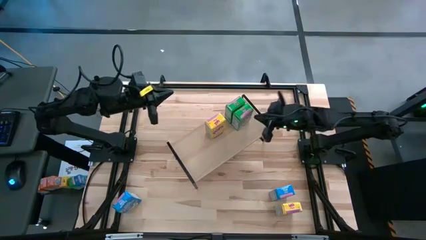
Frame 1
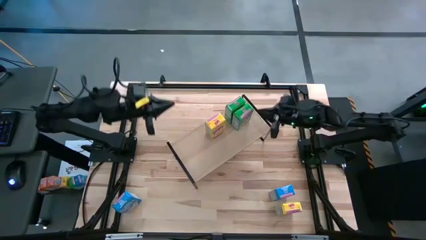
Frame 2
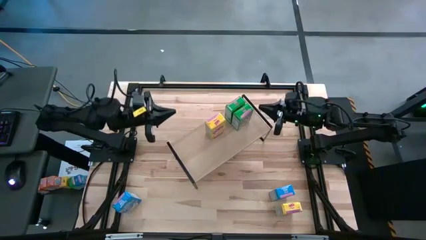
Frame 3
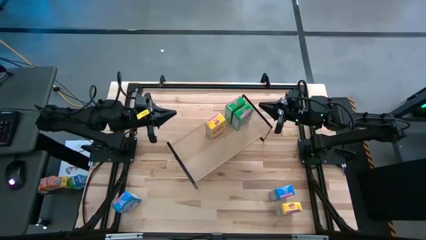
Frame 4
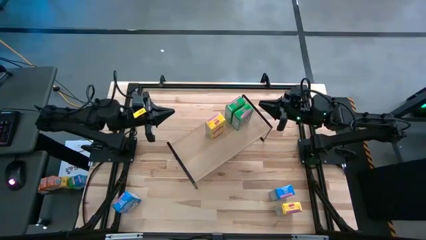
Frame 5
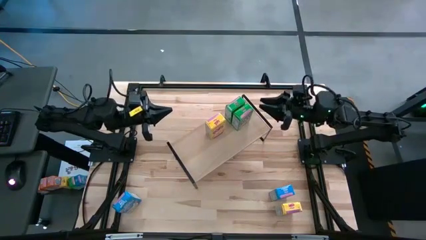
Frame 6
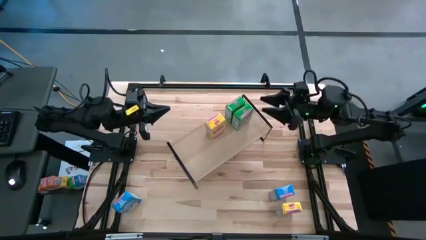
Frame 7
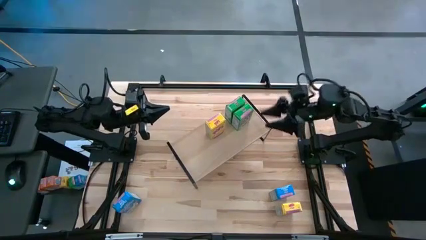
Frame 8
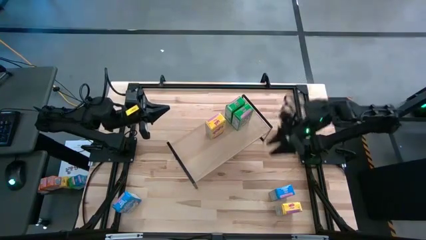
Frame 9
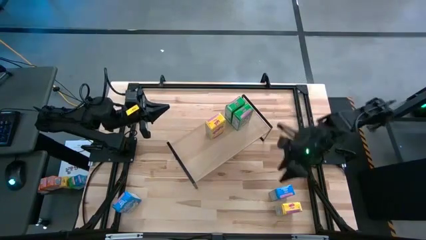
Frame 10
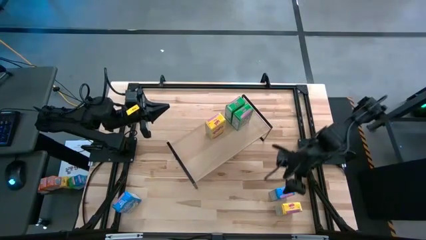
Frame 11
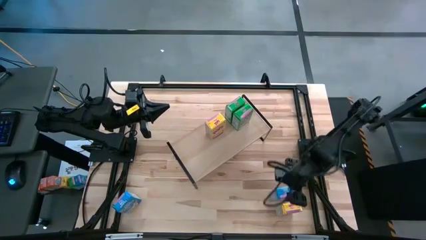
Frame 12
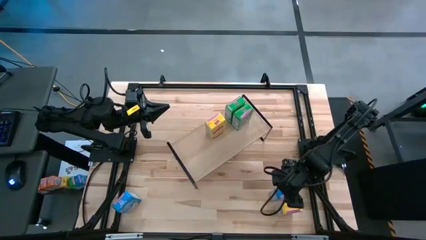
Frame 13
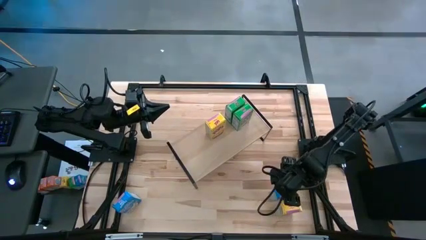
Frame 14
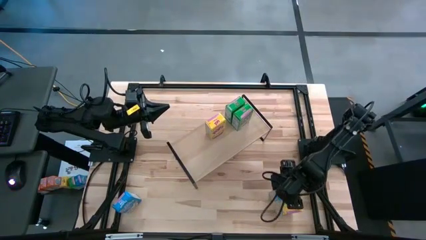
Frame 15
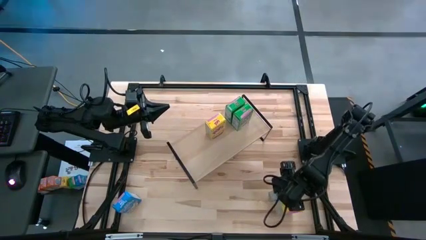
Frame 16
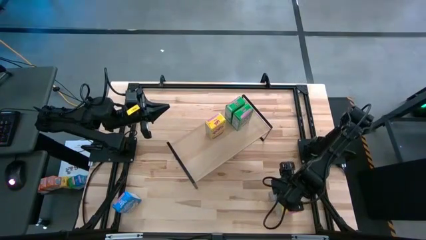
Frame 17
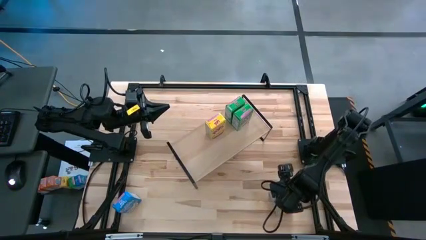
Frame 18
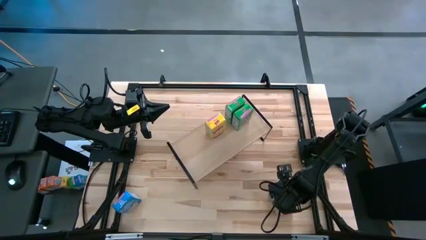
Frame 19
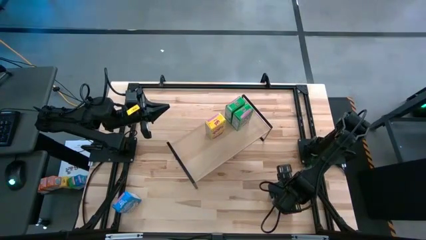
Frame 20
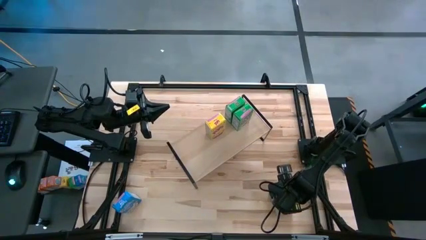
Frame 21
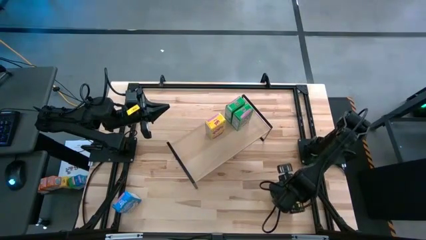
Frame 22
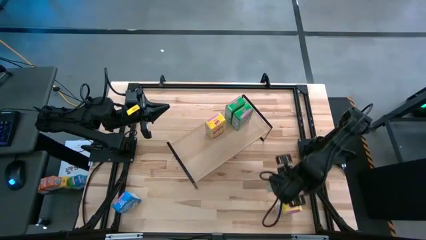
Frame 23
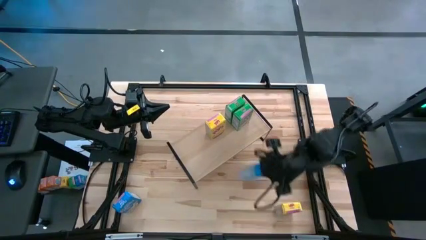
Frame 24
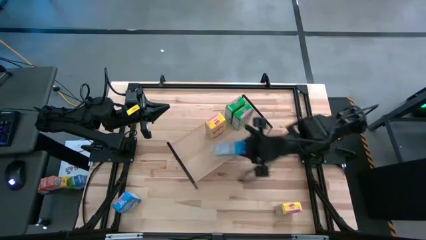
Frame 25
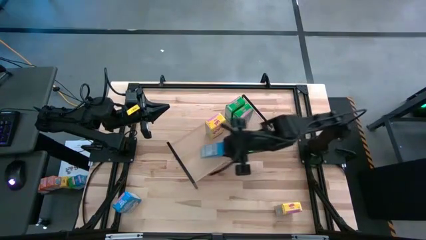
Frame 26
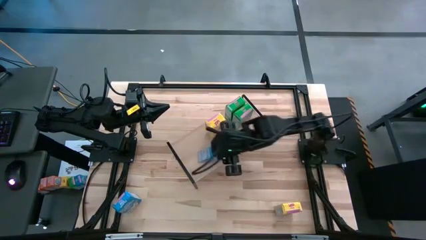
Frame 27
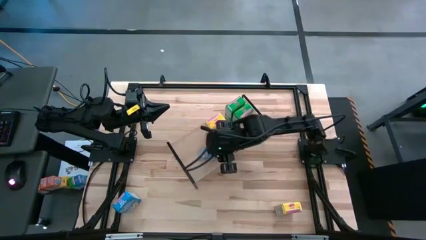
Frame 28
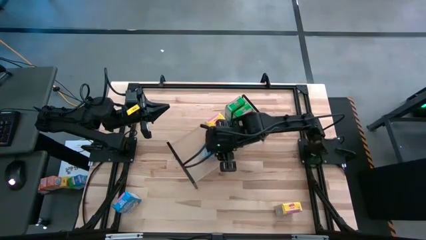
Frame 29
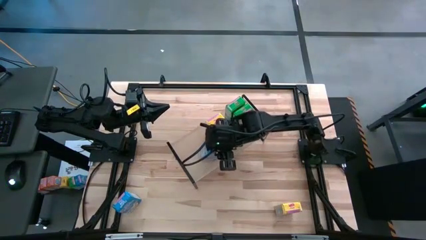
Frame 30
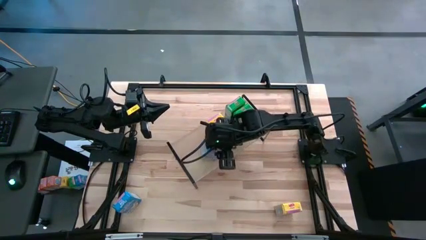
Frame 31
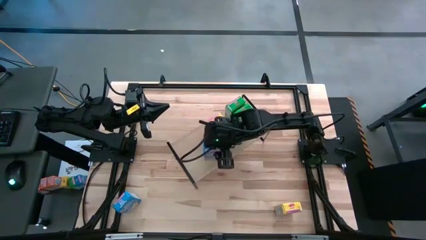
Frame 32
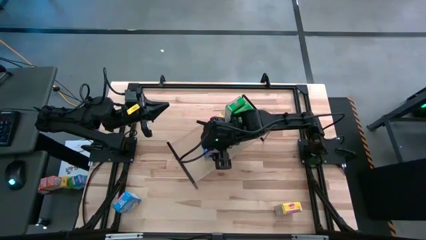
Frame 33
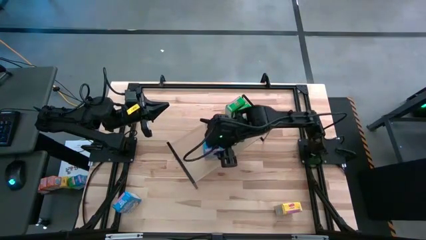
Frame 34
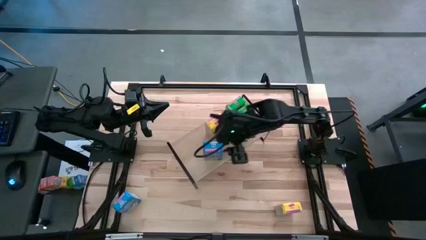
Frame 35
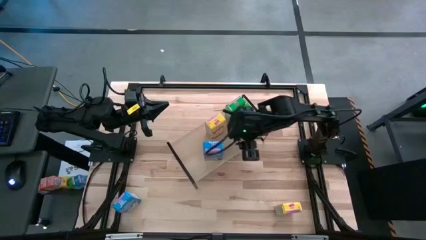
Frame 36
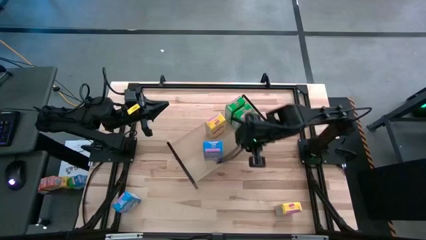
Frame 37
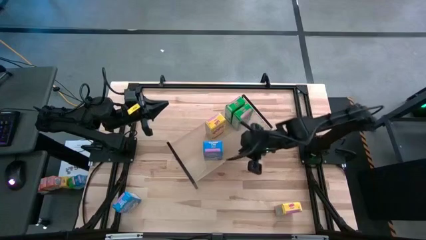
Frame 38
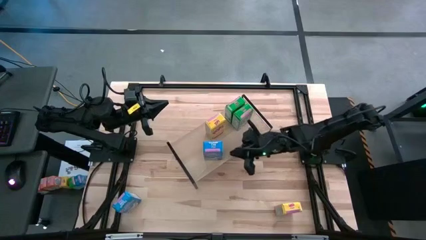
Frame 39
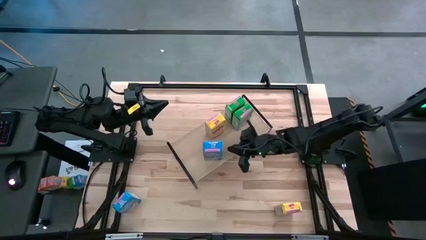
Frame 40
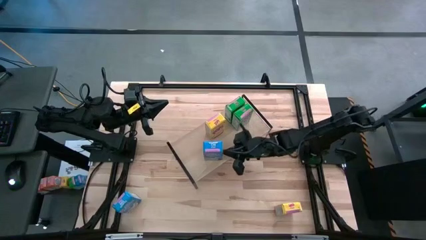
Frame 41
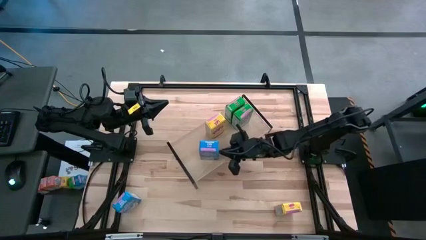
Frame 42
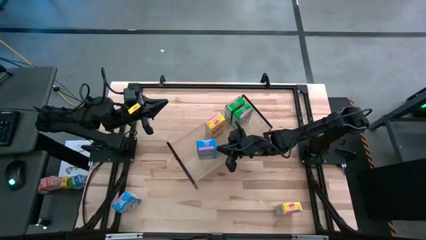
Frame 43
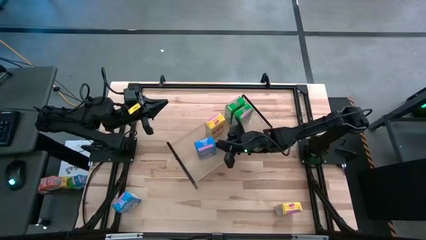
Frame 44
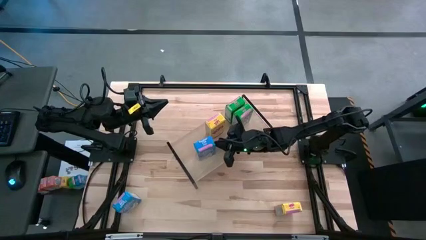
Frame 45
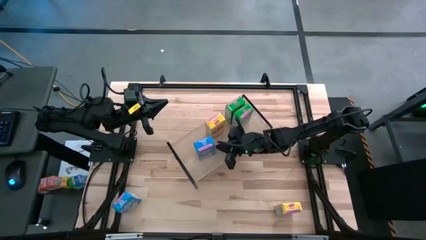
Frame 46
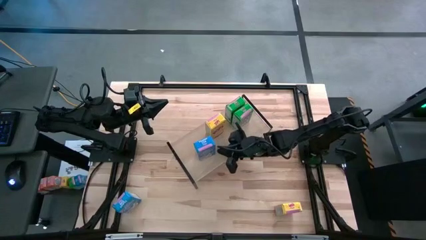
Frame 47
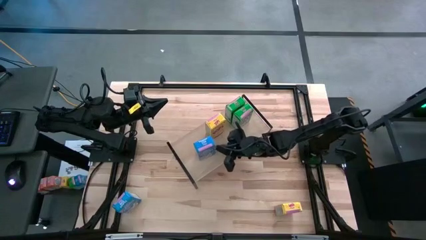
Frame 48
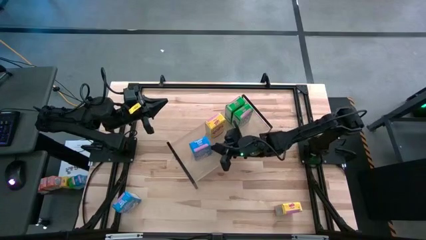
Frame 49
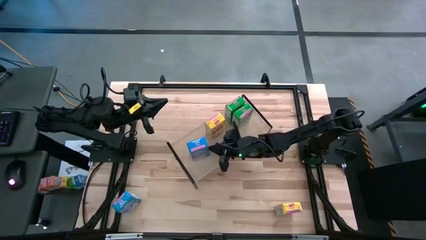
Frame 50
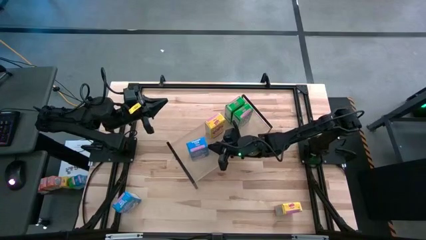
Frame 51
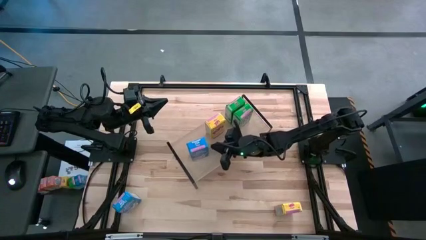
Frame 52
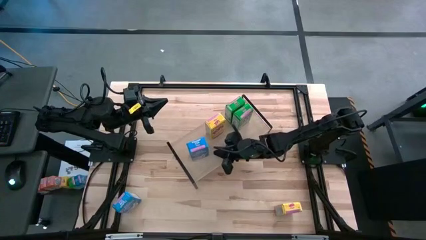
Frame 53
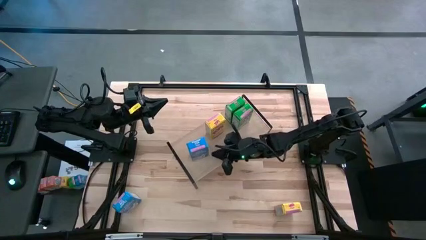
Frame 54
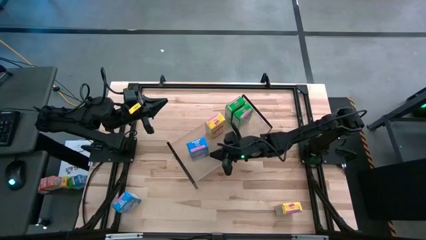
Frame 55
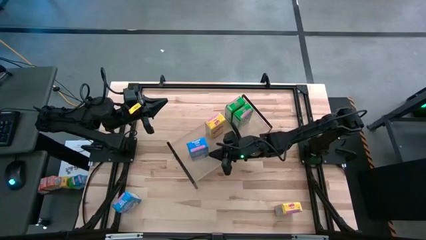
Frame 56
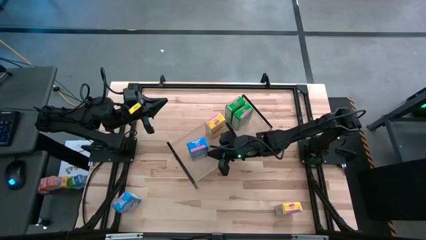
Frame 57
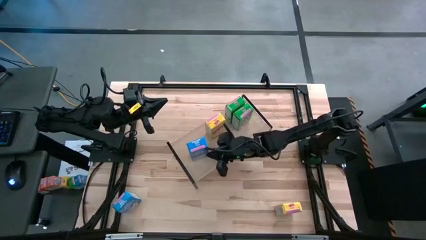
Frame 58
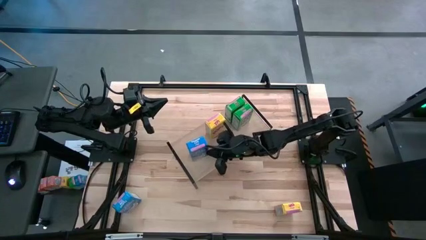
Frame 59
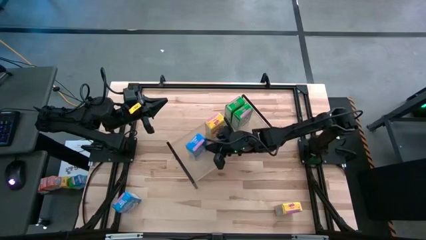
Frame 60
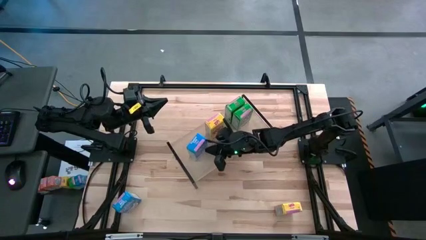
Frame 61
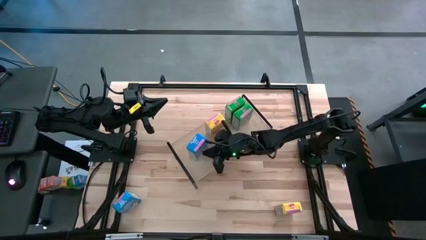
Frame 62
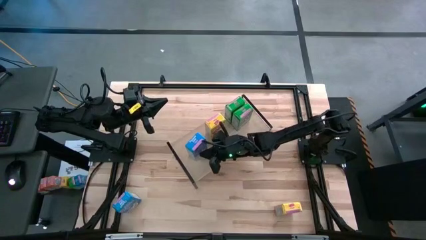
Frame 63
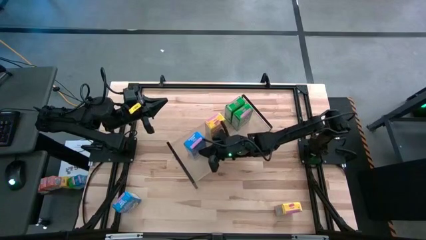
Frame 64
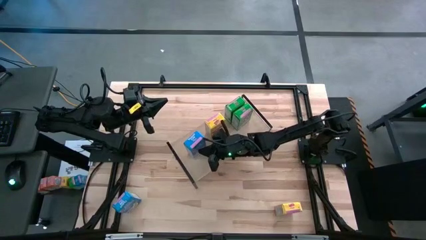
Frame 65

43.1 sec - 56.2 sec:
Task: Stack cereal on shelf
Put the right blue cereal box on the shelf

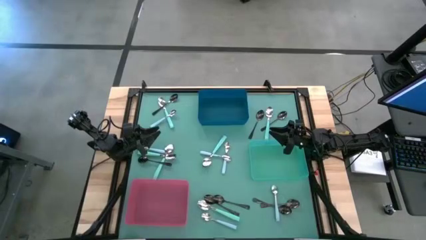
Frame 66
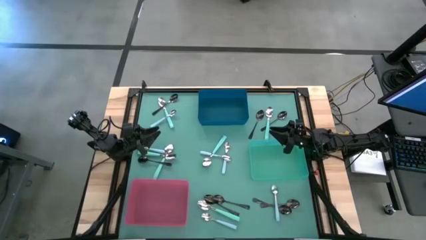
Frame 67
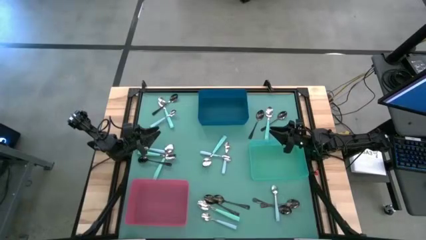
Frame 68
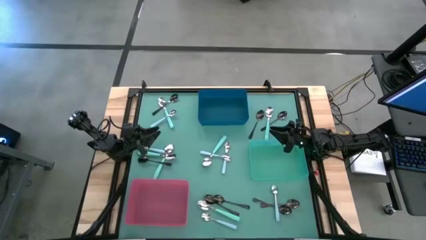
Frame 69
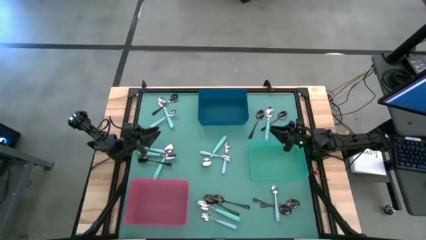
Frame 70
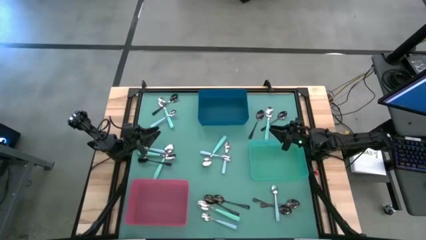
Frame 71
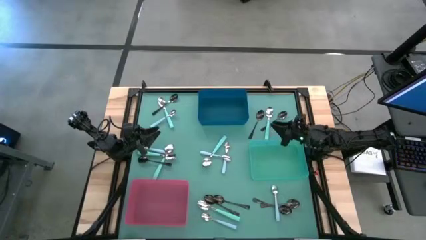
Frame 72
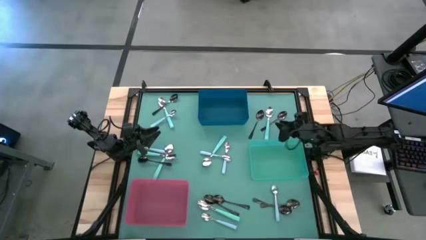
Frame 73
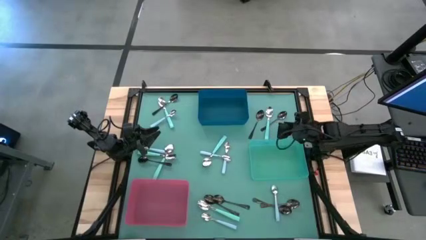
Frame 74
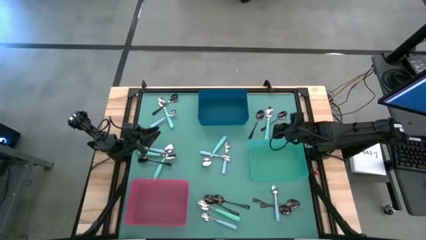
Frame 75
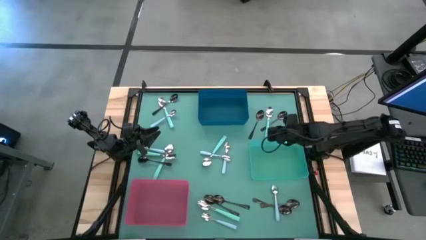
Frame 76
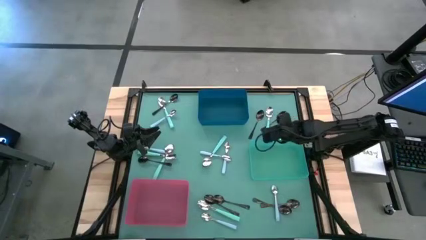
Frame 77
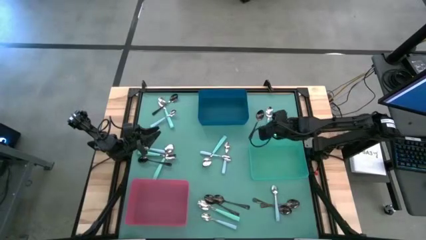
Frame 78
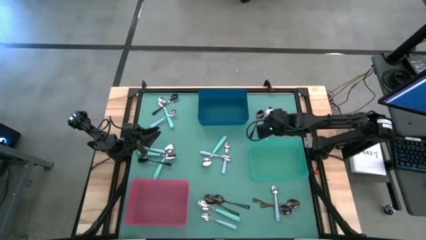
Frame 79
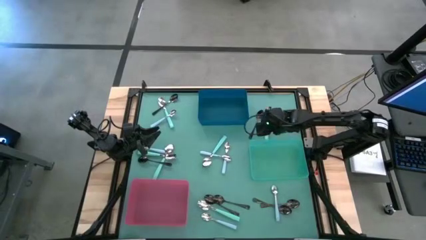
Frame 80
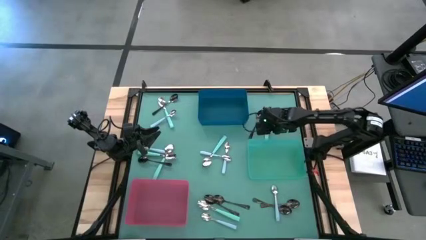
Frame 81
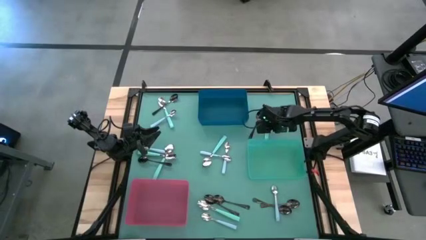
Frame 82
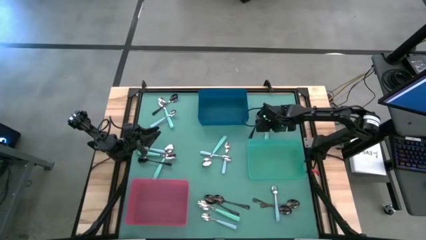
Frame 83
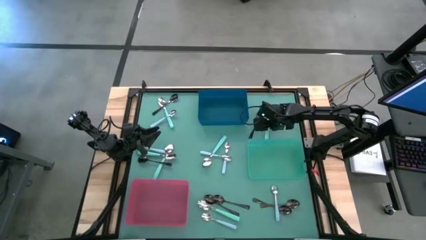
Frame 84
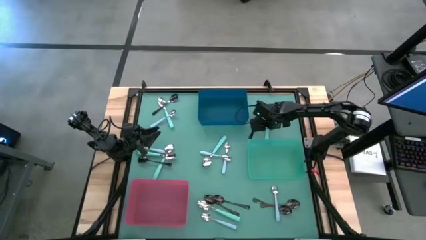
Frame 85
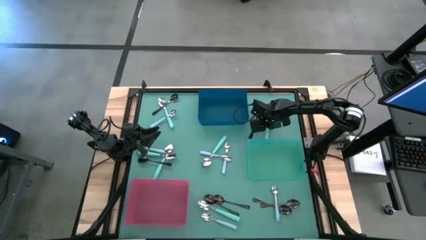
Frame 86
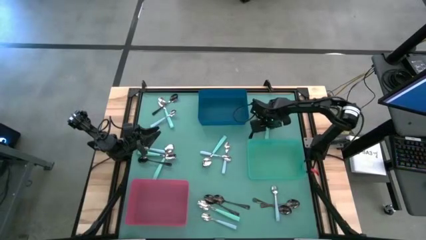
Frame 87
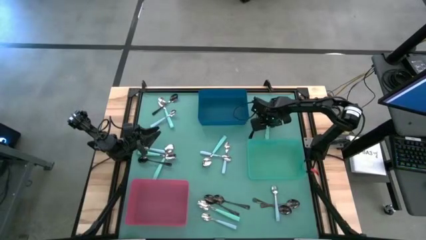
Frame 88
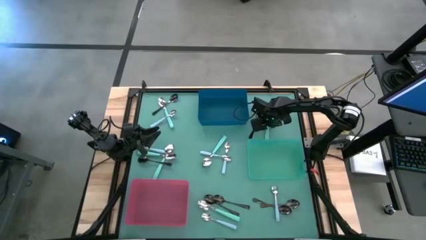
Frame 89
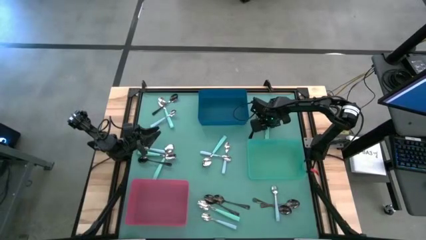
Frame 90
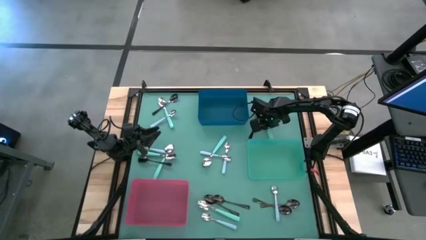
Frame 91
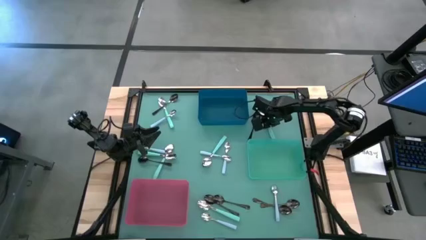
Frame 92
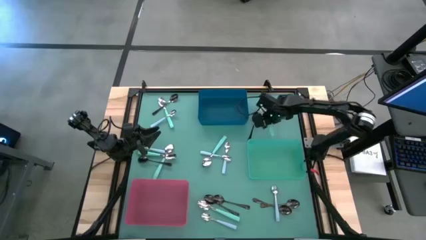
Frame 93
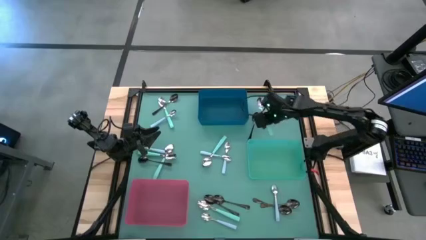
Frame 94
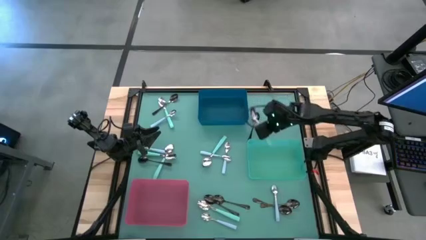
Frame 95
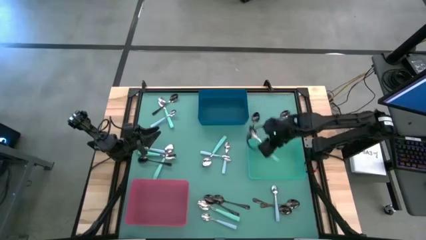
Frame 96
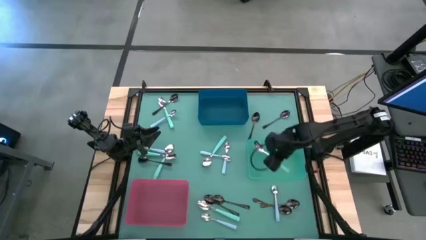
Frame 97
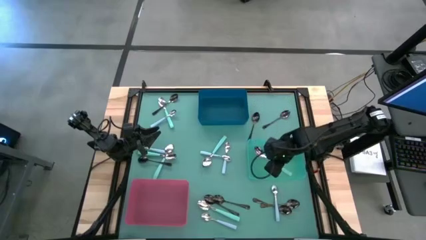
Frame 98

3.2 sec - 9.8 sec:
Task: Sort silverware by color (type)
Put the green spoon into the green bin
